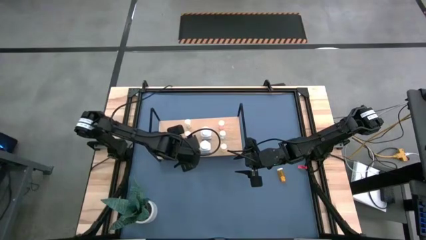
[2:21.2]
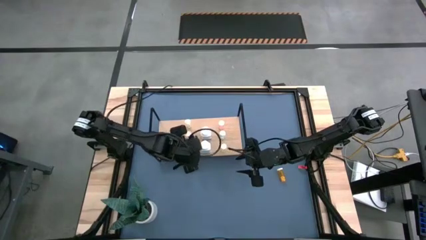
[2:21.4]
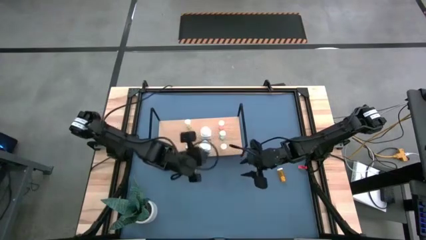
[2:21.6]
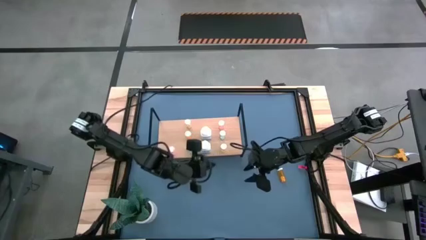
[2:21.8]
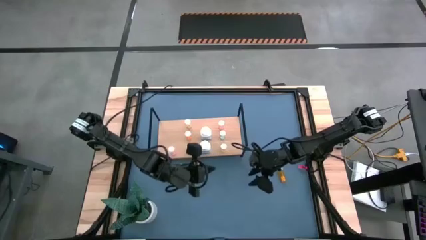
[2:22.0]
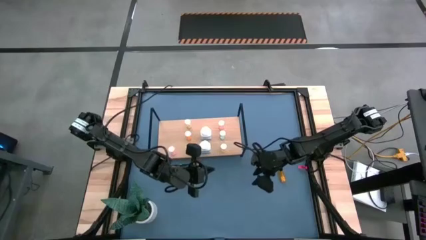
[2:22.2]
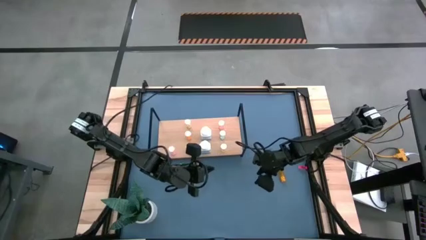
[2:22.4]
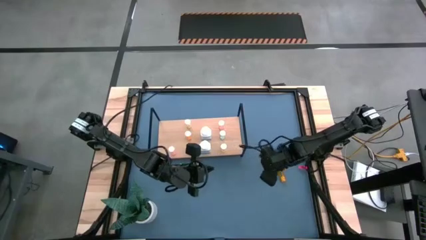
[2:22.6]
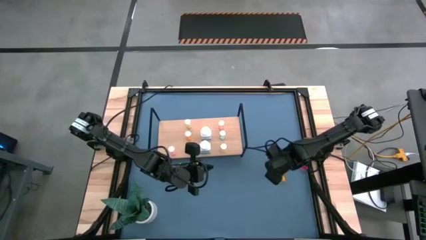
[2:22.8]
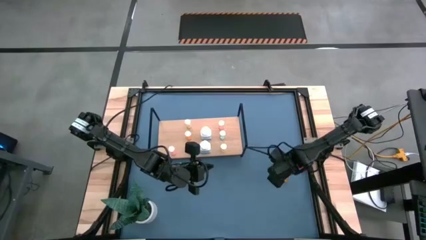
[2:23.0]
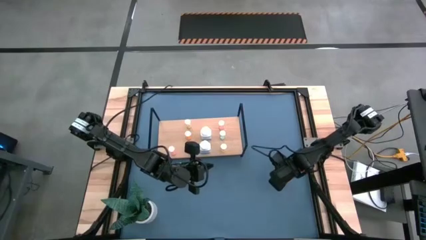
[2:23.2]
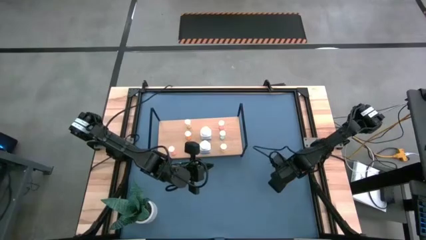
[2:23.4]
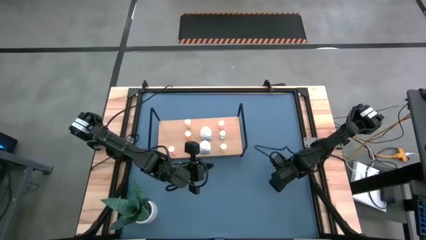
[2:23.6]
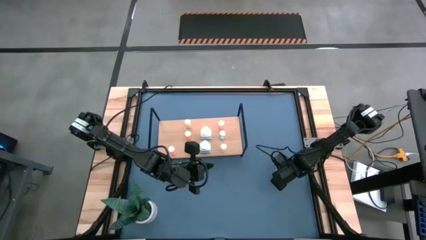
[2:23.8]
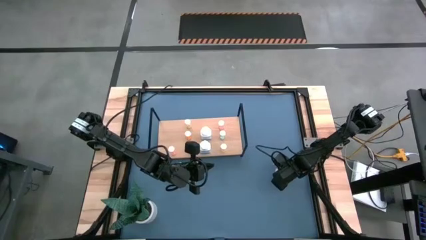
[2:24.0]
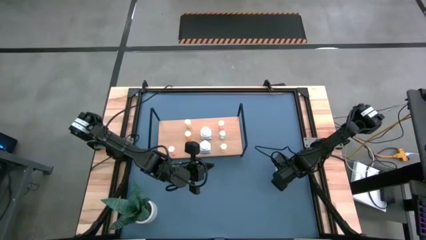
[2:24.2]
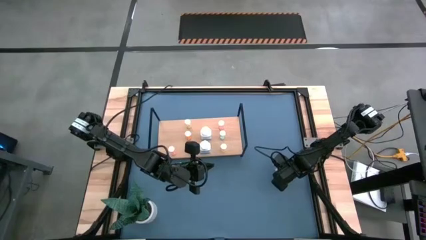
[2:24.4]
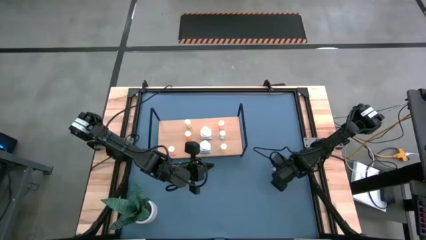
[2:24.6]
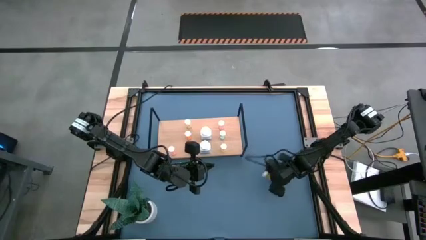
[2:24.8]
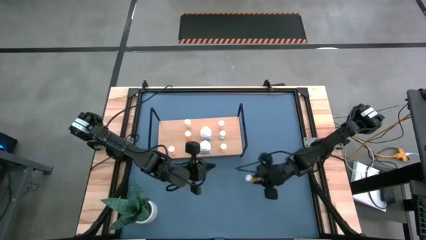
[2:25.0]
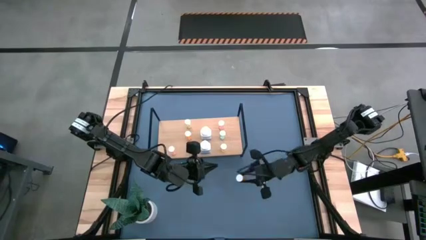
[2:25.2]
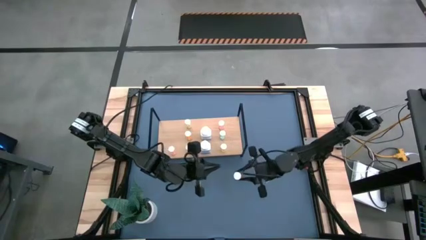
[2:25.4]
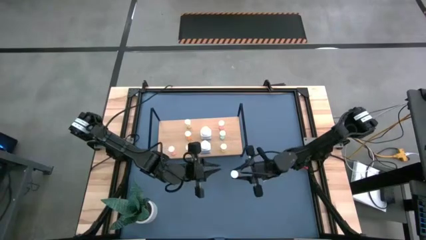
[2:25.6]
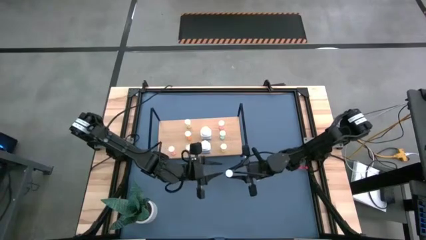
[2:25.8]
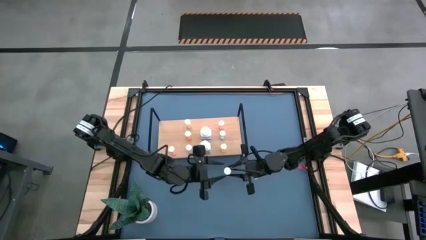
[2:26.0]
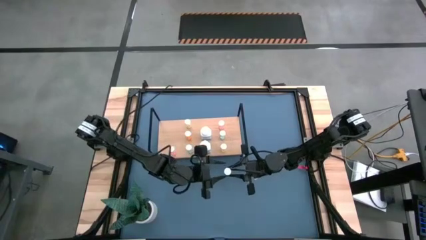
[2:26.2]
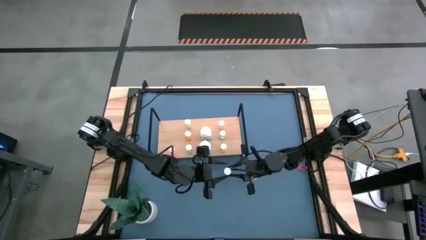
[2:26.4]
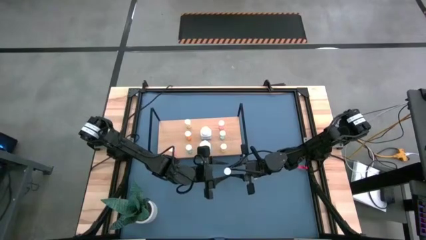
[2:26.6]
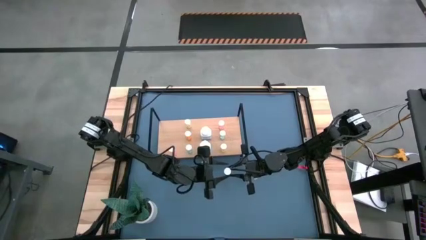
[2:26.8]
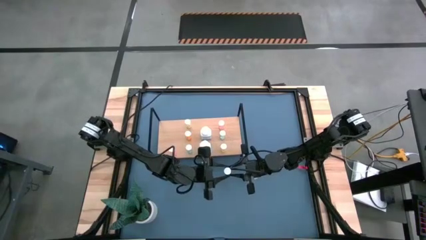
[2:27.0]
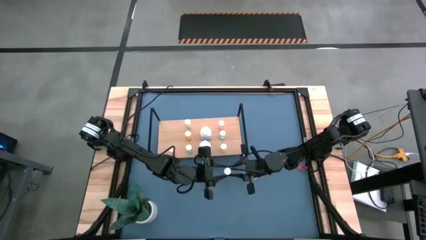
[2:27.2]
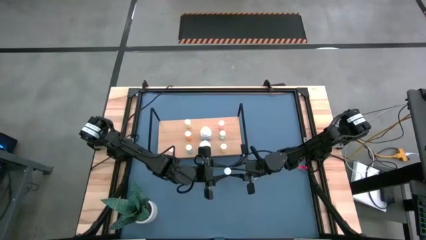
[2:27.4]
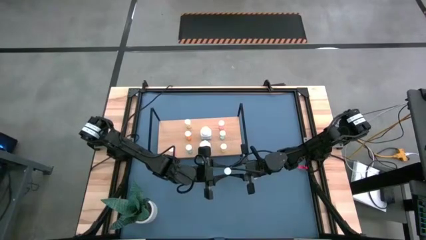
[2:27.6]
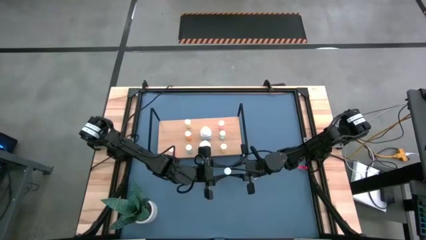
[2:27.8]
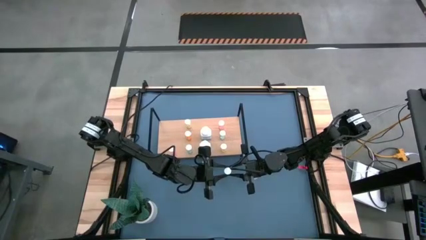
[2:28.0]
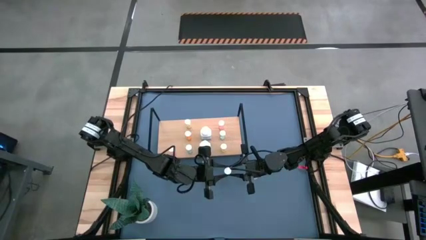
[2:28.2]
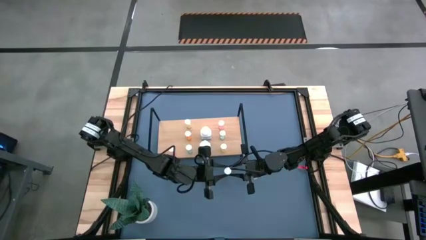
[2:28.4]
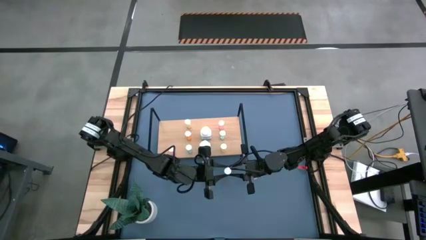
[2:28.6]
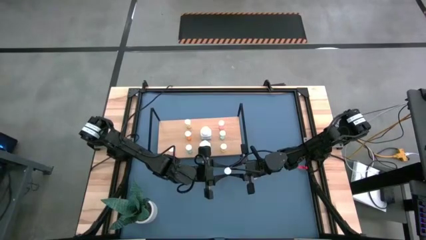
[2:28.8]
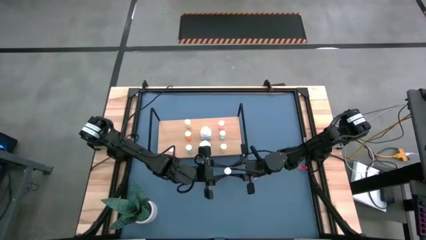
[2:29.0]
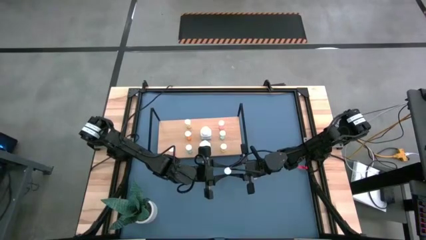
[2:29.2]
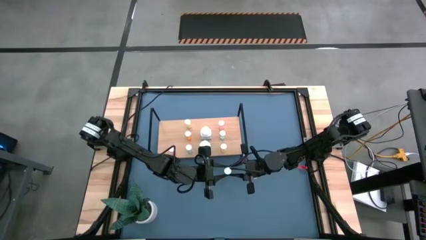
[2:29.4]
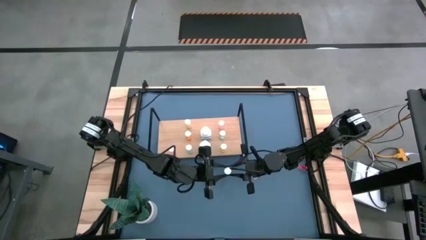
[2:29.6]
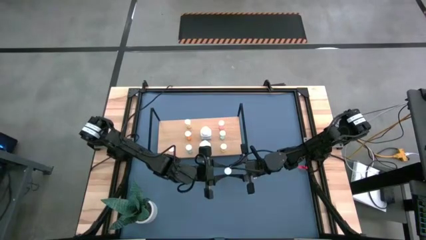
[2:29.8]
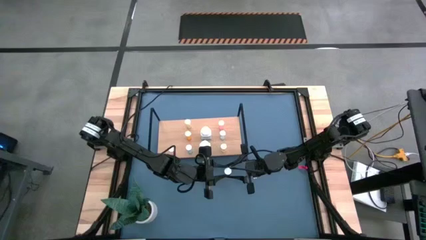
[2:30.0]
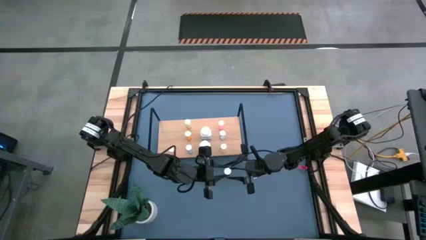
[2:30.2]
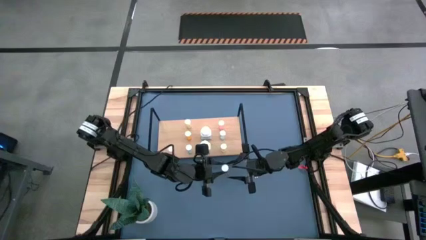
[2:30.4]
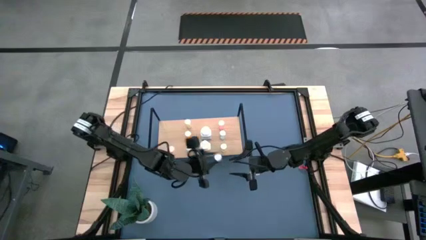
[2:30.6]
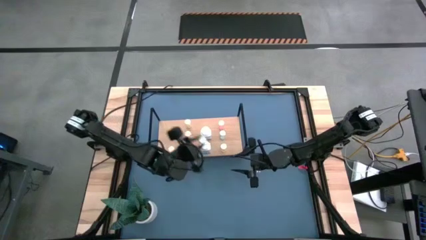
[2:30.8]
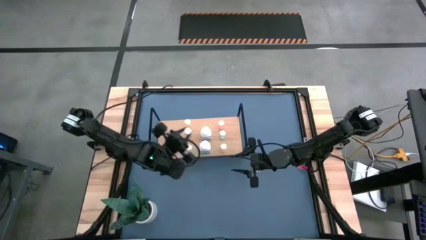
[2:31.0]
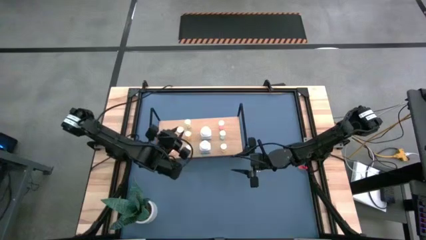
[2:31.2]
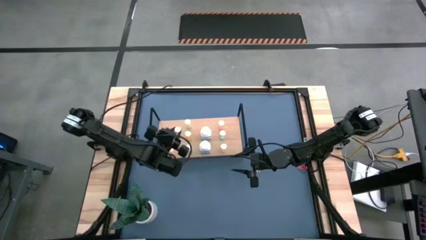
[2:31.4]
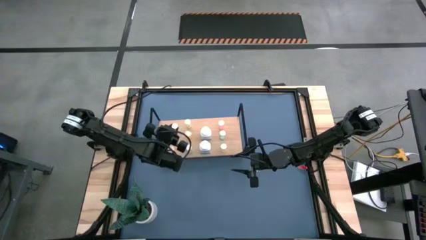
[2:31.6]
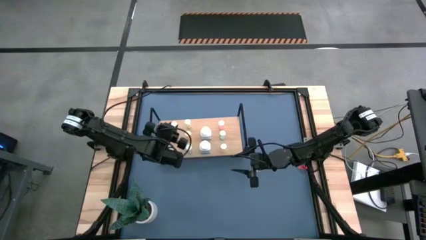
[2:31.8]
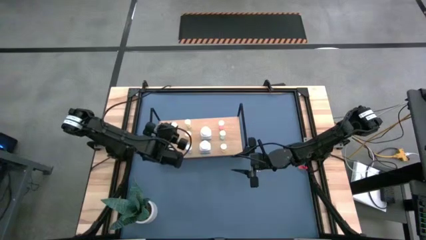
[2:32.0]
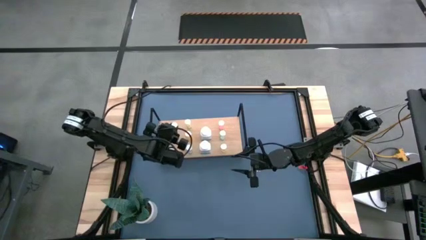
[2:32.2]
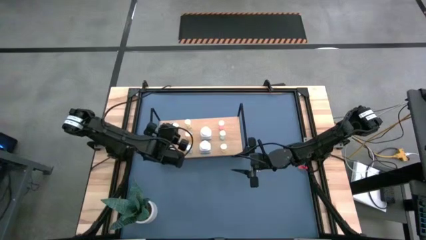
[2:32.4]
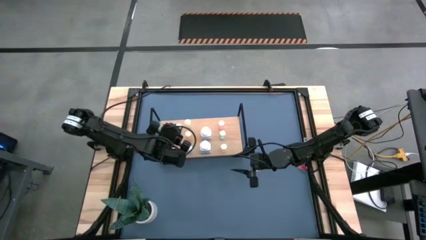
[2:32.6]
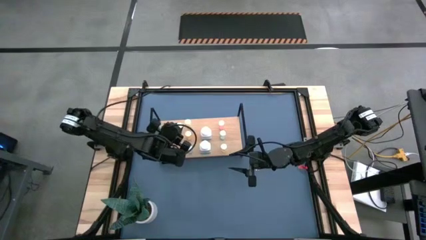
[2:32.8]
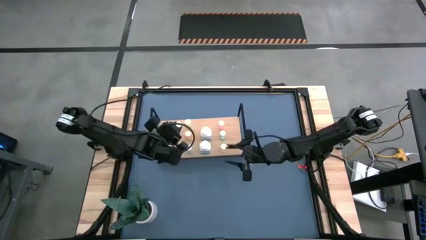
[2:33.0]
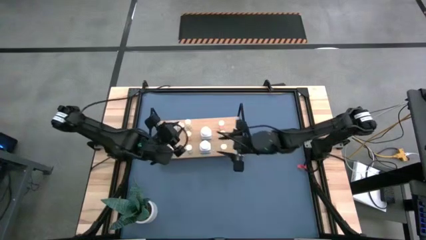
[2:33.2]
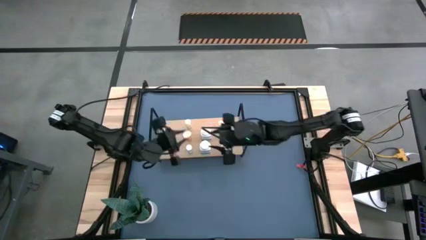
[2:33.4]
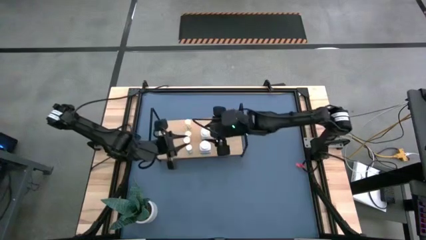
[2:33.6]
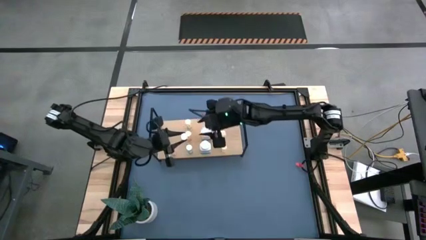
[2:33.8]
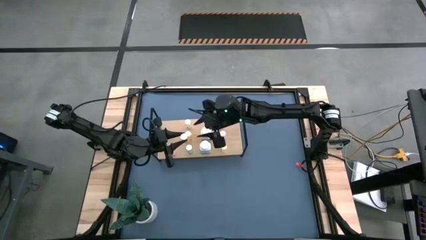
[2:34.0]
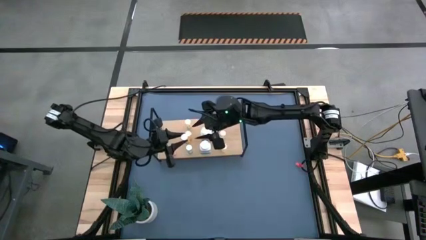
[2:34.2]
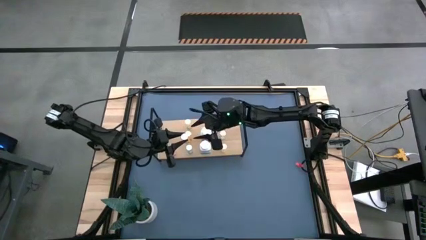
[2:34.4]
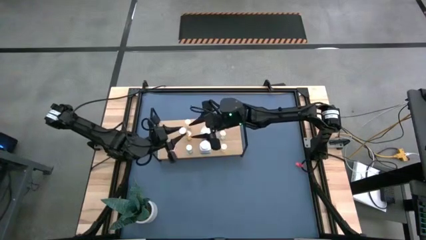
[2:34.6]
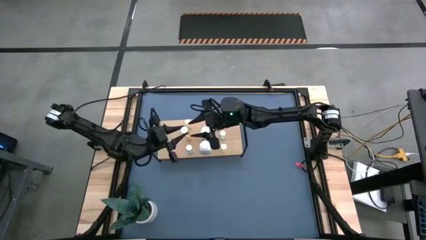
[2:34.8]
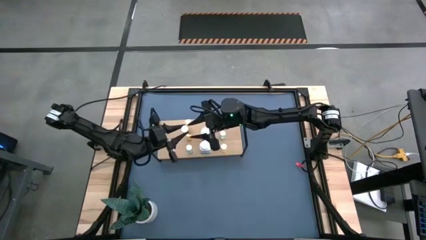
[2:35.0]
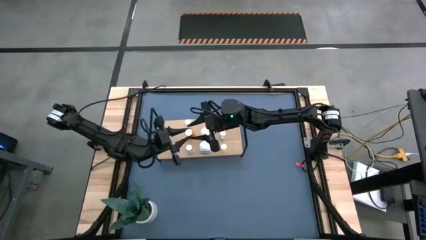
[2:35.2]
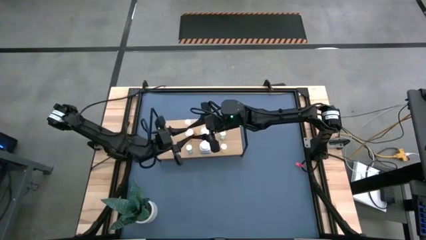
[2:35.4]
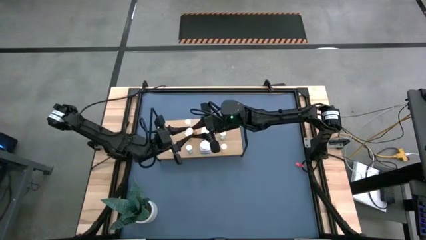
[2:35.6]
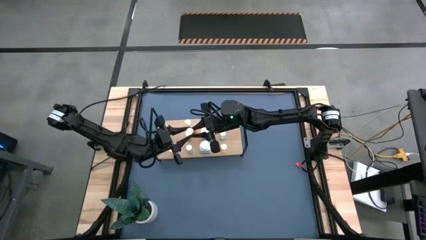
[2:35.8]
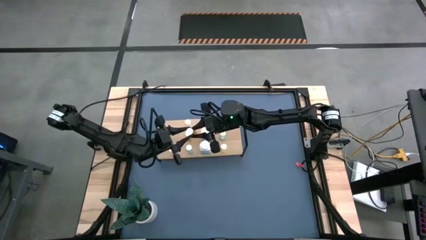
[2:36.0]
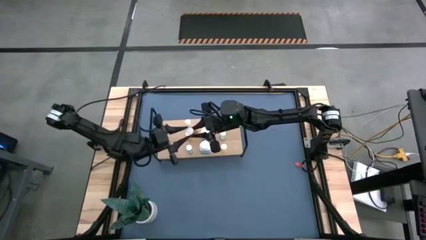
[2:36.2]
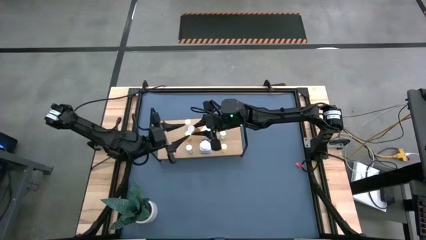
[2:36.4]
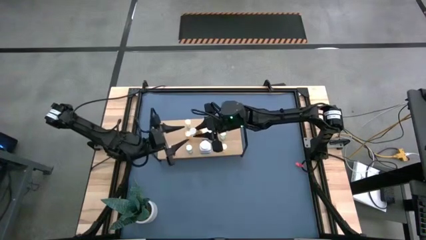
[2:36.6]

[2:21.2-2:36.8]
Task: Pick and place medicine bottles onto shelf by color
Put the orange pill bottle on the shelf

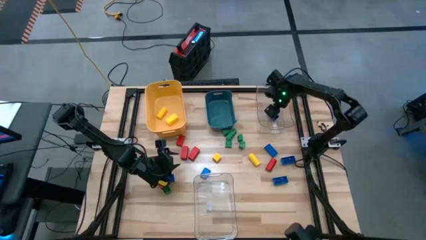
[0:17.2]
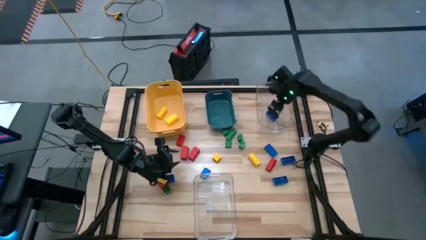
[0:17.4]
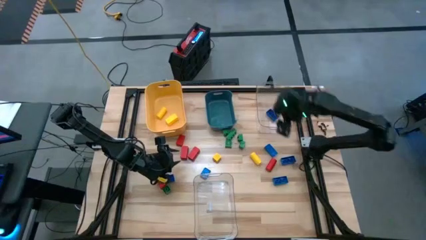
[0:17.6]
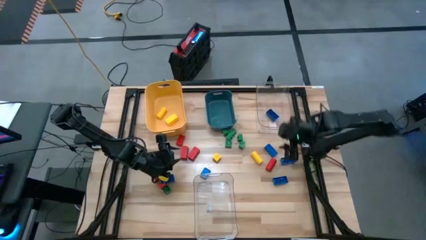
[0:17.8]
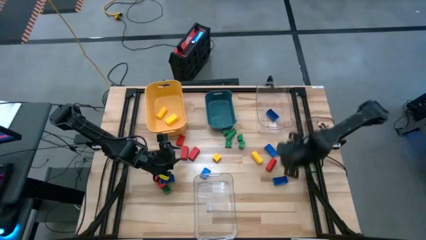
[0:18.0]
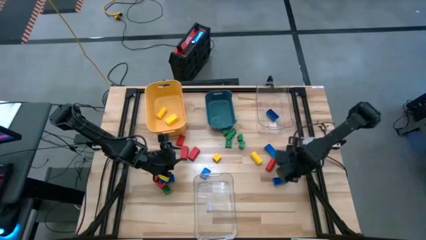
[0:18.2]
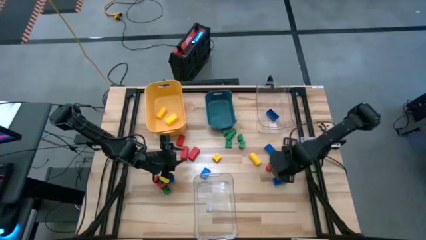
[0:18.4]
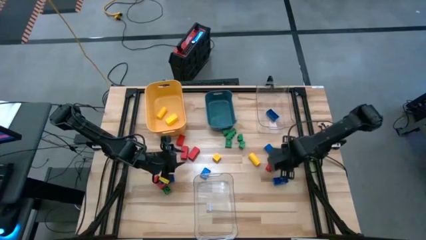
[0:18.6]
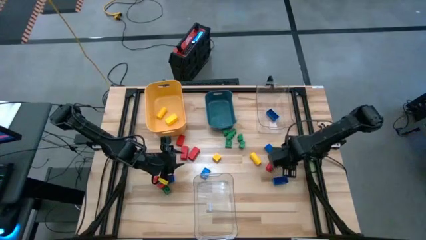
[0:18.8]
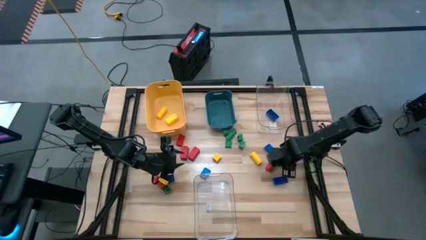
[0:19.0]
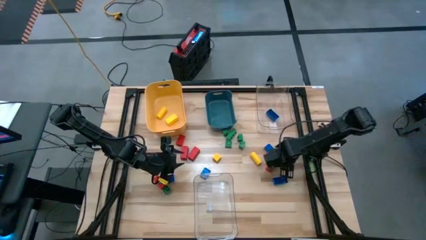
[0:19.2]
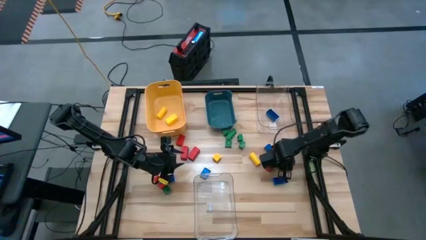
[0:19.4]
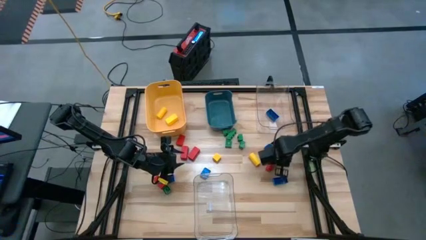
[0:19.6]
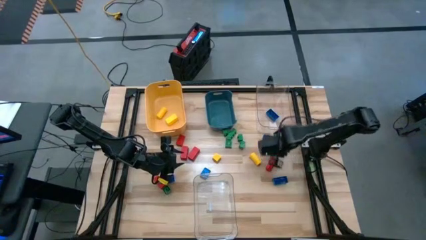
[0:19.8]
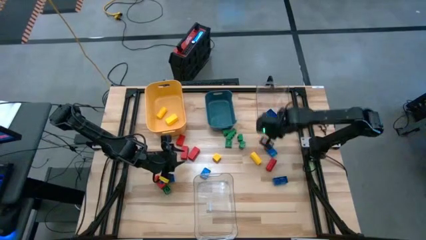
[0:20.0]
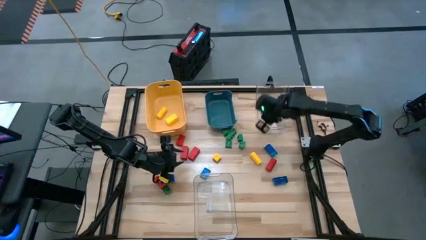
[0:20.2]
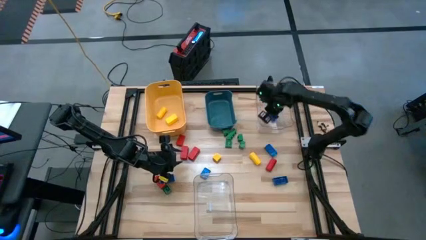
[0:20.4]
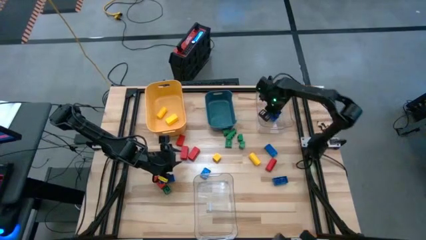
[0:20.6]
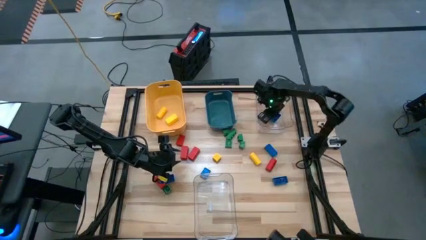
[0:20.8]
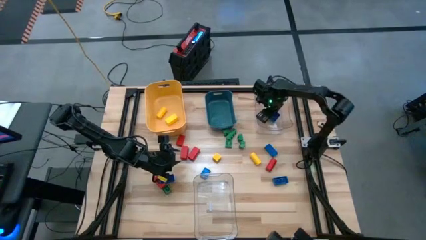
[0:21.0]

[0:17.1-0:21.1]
Task: Sort blocks
Put the blue game piece into the top transparent bin
